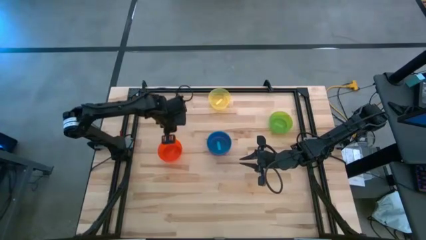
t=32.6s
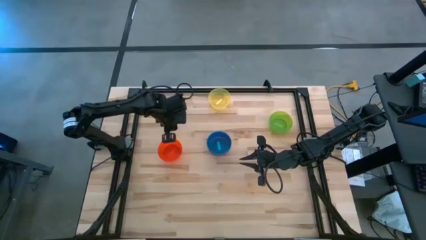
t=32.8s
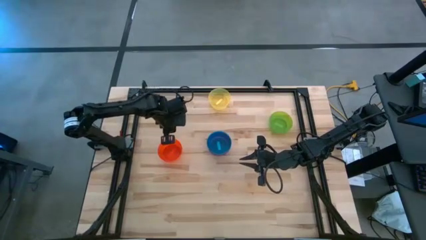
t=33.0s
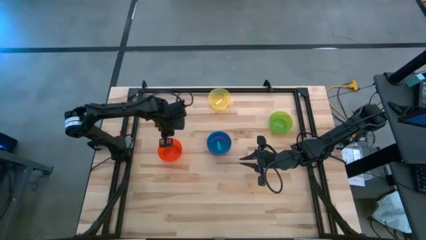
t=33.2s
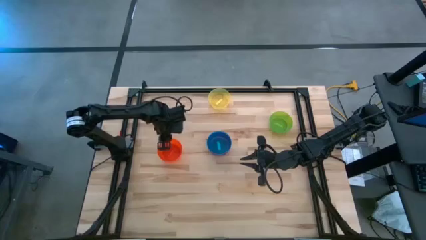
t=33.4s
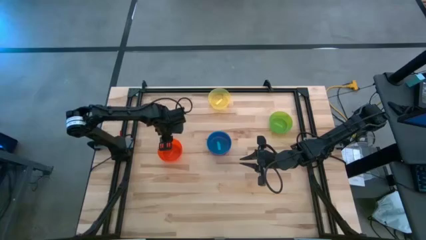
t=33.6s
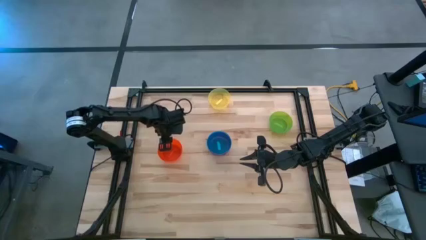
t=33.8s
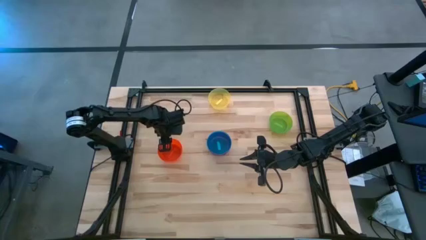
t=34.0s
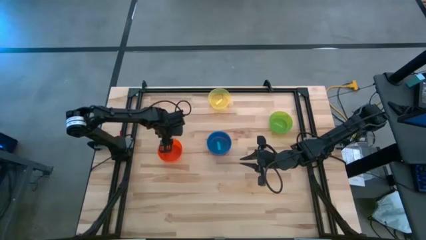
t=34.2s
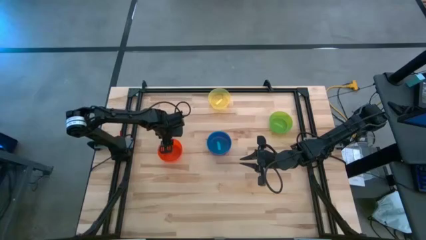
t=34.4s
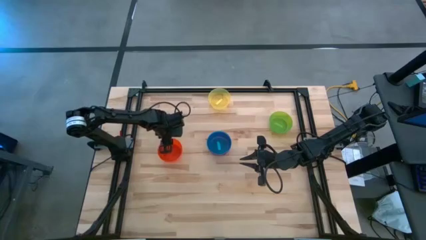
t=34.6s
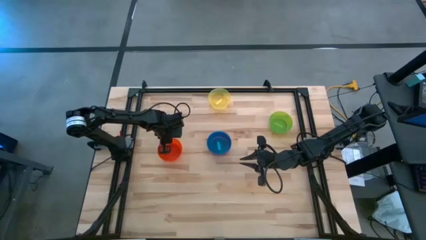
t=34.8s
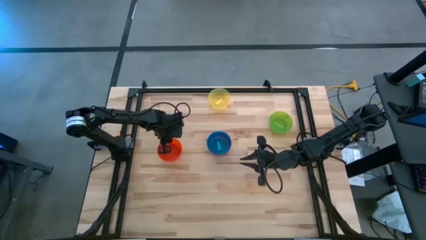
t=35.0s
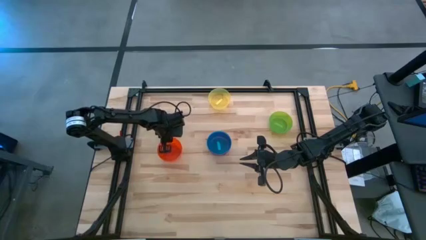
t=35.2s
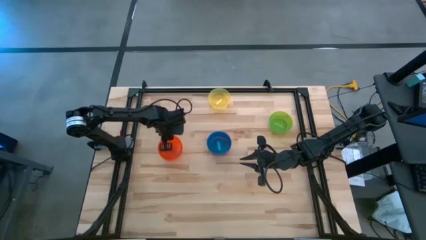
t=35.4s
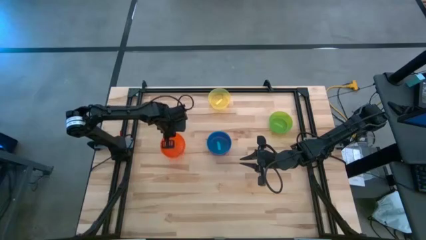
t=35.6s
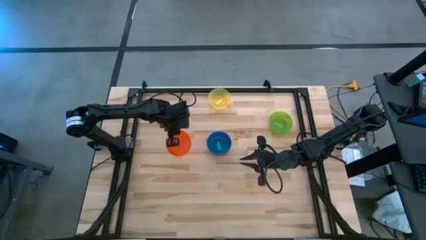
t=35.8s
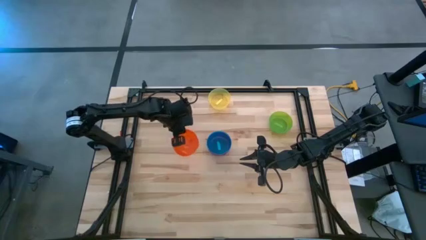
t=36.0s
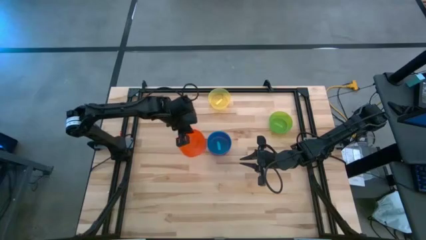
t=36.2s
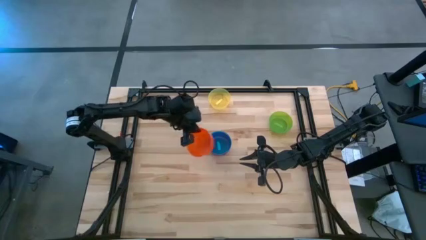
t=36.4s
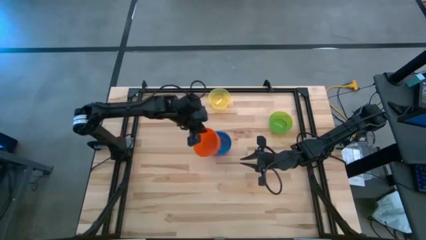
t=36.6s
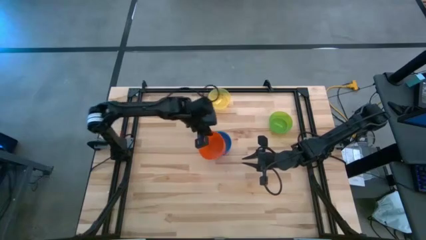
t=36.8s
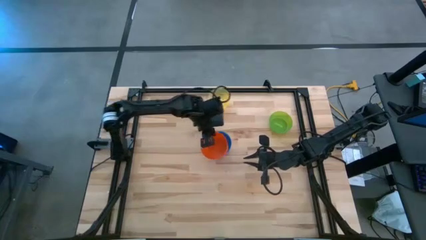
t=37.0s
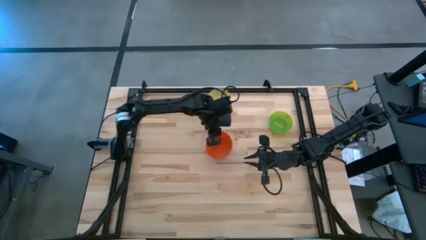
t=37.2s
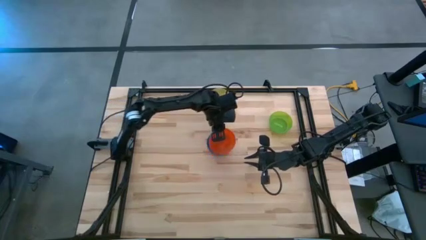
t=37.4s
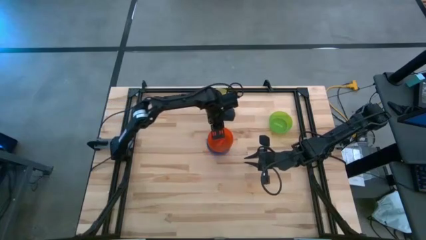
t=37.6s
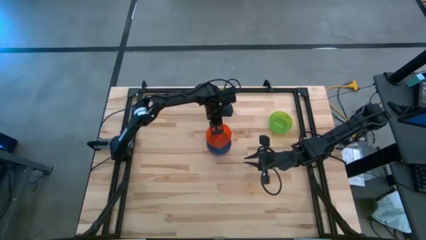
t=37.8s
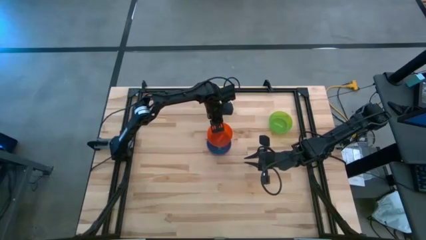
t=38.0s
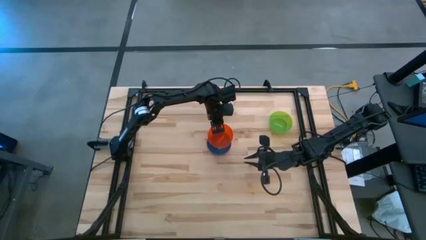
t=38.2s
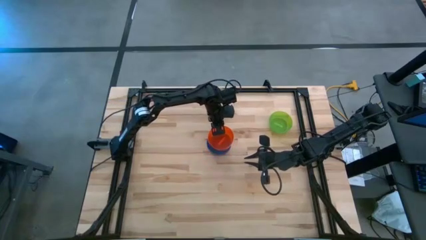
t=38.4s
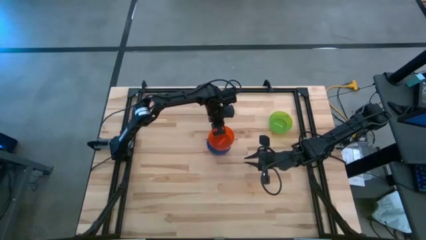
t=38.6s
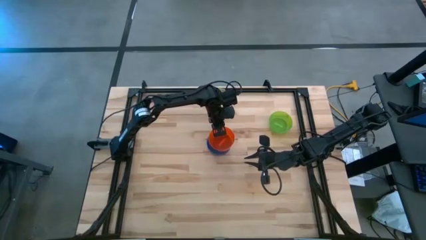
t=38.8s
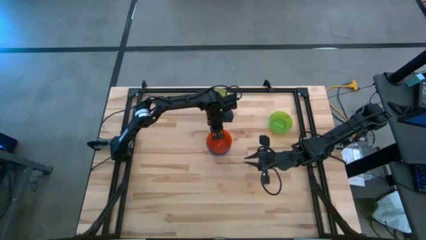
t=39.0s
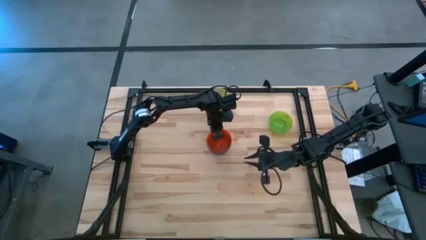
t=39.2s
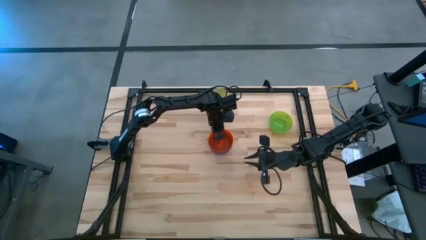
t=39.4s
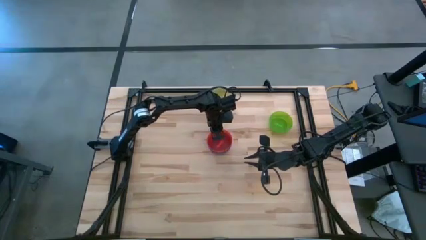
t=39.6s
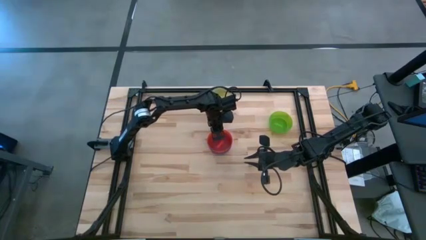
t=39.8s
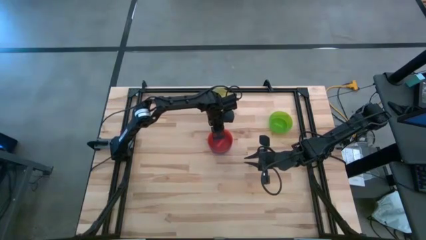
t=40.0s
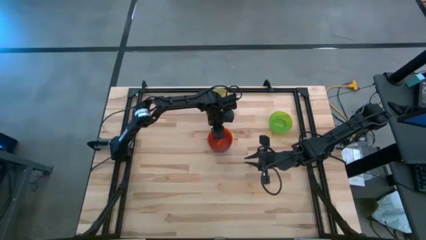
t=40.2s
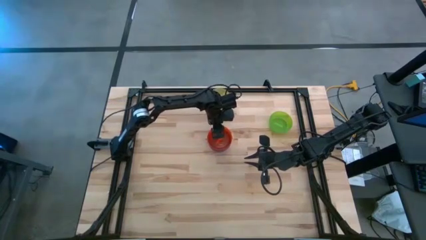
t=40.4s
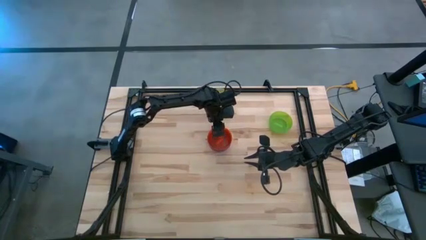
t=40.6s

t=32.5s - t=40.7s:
Task: Nest bowls inside each other
Stack the orange bowl on top of the blue bowl

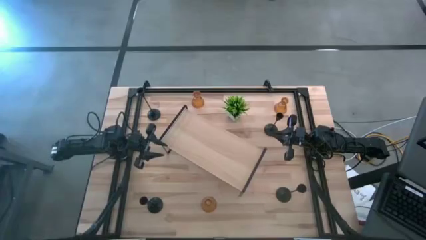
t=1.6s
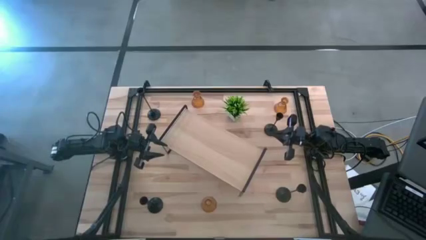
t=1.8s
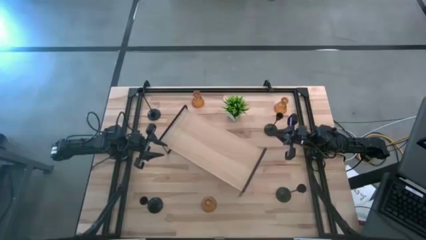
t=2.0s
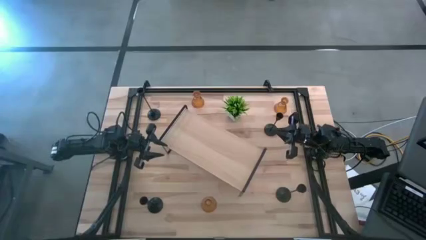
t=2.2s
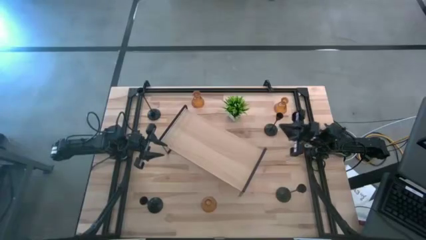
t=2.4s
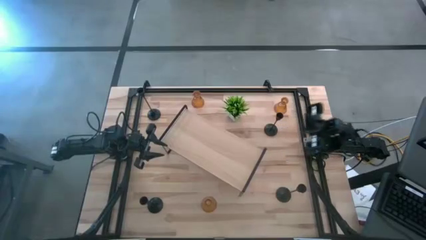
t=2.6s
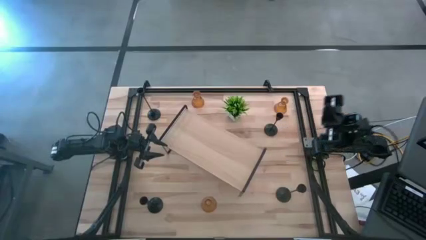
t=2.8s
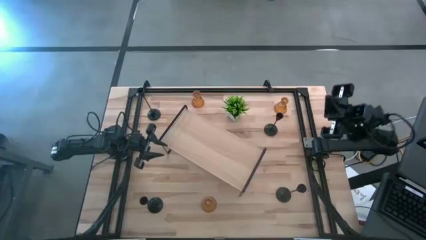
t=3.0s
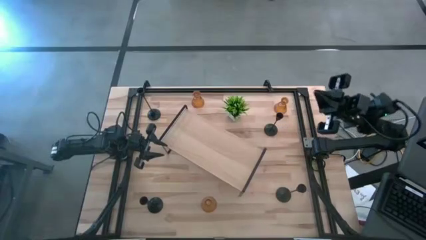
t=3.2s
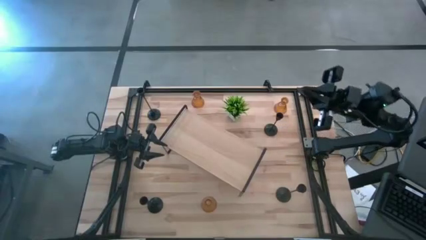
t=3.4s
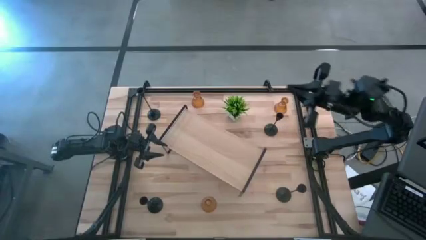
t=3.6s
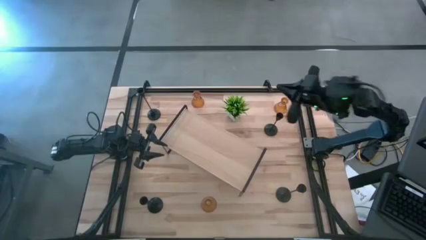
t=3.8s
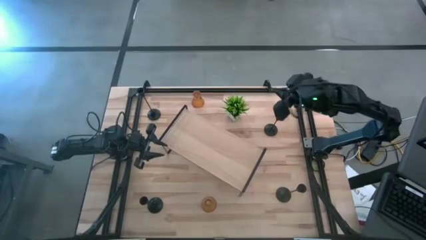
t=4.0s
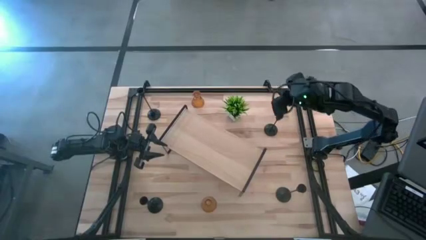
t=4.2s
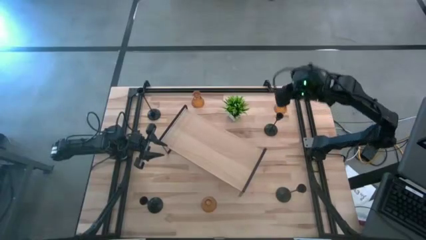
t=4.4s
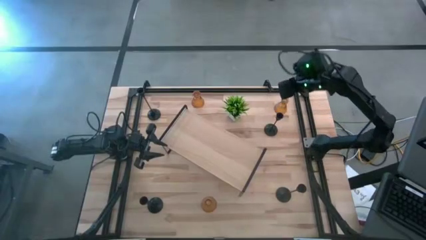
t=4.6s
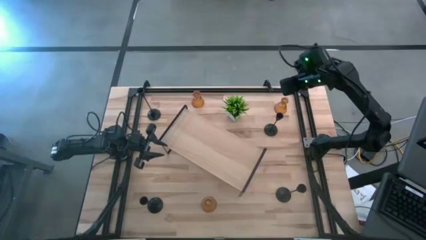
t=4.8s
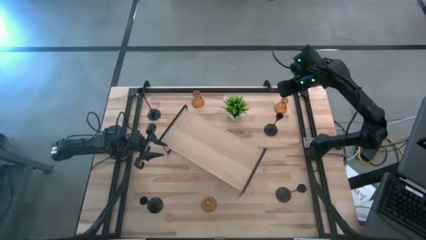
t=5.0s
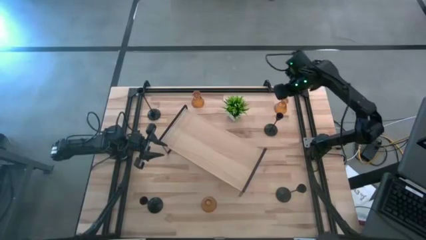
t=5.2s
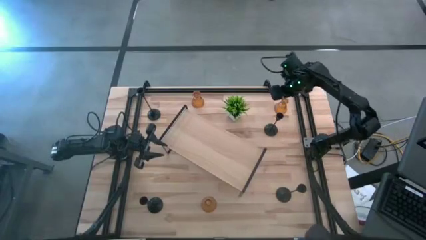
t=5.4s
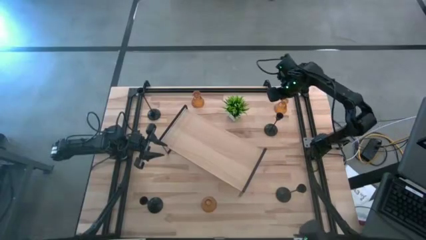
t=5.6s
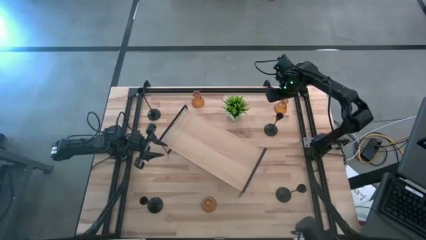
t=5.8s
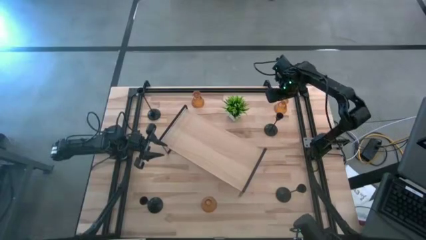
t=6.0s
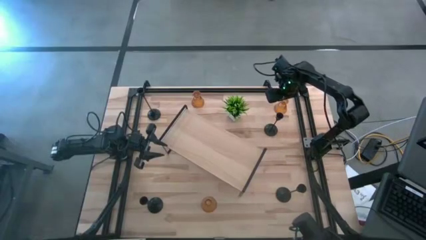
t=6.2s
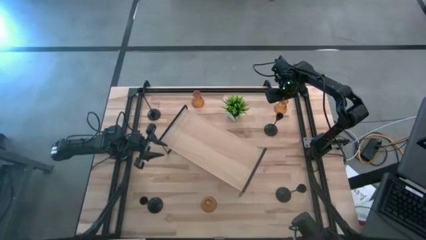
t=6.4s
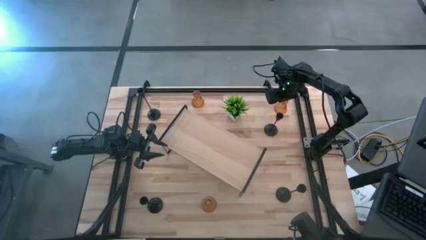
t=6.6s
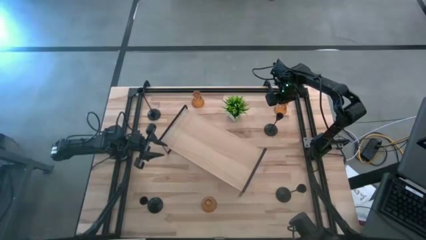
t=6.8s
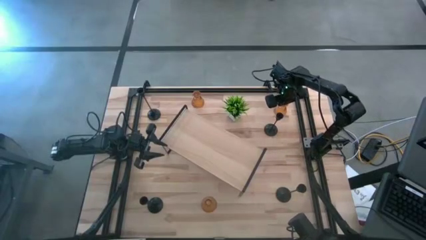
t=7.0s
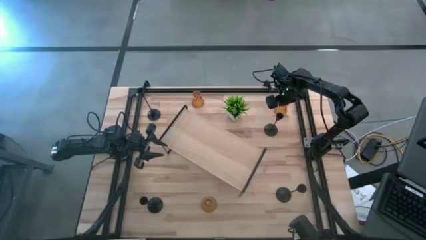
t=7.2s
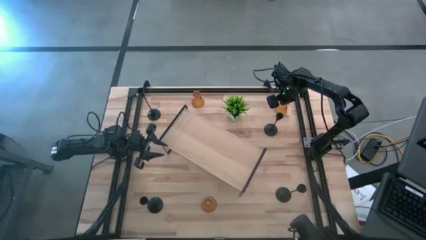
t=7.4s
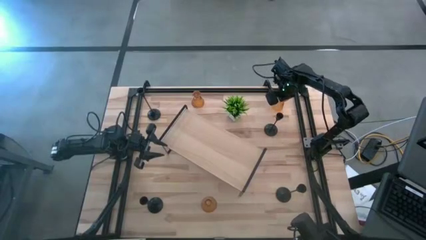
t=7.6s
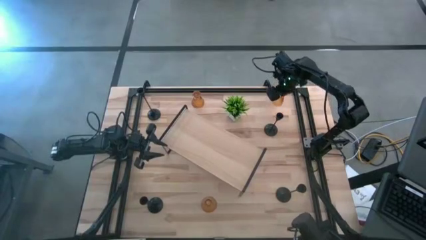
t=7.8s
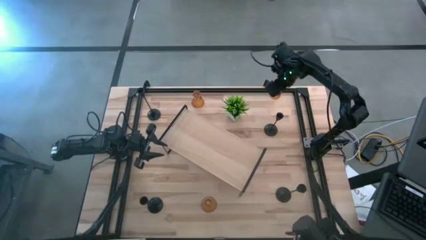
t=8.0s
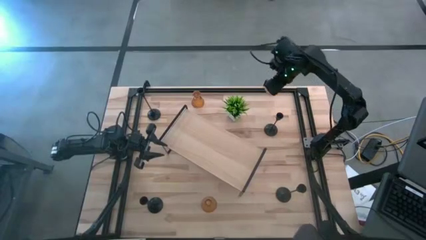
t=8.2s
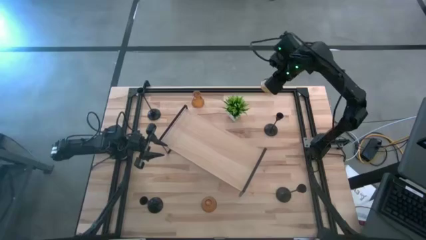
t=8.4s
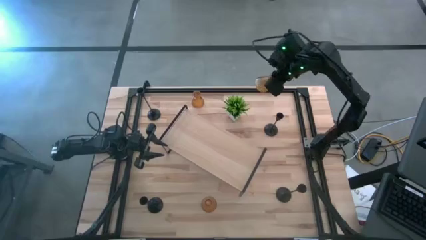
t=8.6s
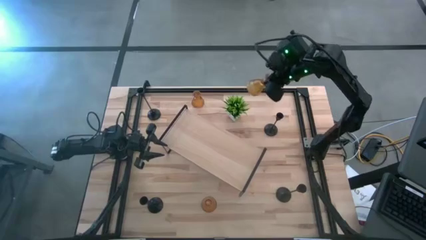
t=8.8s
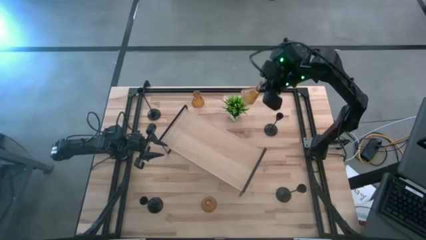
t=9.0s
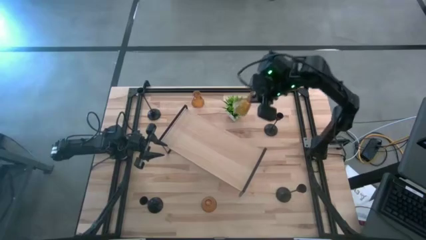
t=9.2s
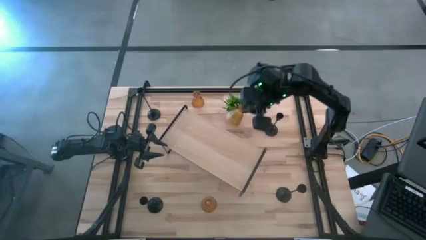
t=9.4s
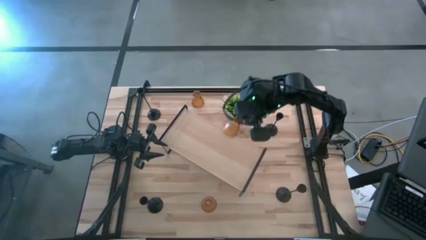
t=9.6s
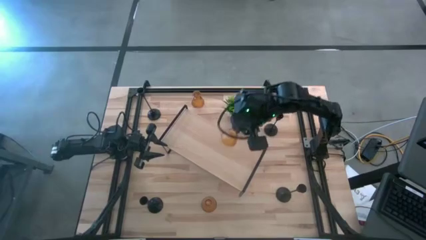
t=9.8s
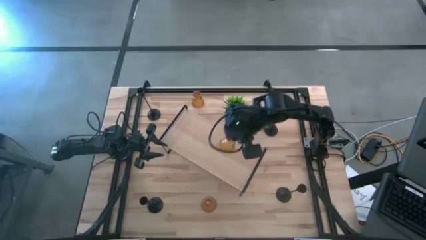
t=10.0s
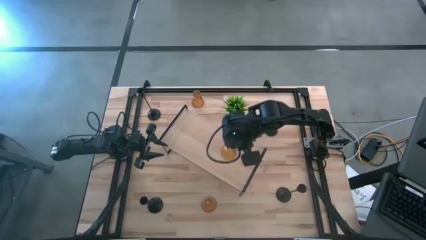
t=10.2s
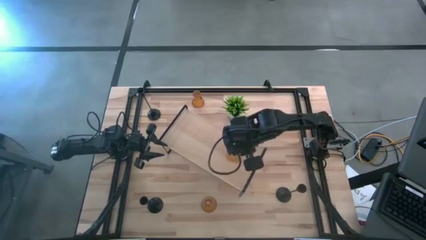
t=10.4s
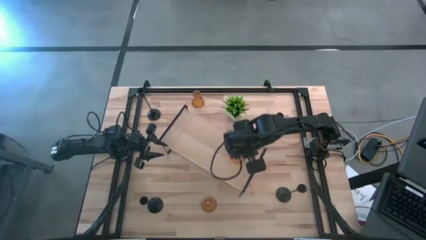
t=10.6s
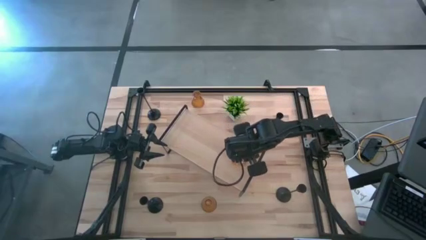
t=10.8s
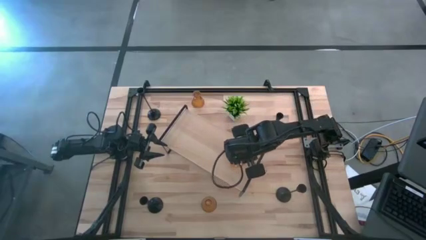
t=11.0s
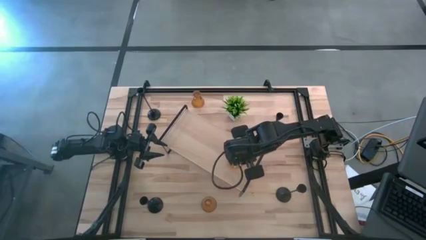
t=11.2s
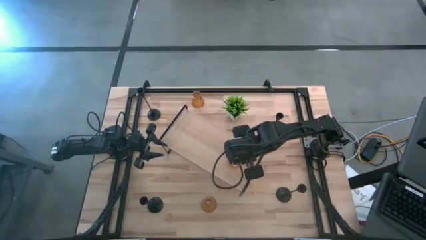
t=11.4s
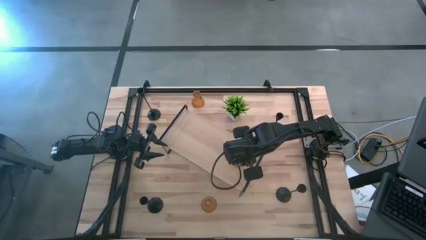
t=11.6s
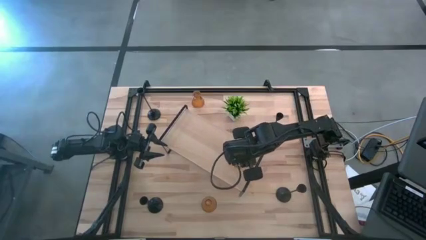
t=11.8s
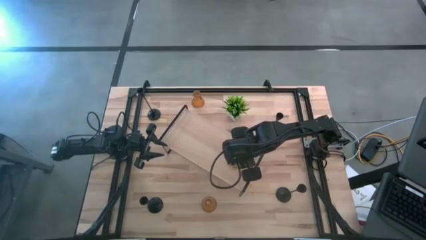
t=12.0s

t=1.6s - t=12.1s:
Task: Pick & Place candle stick holders
Put the orange candle holder on the shelf
